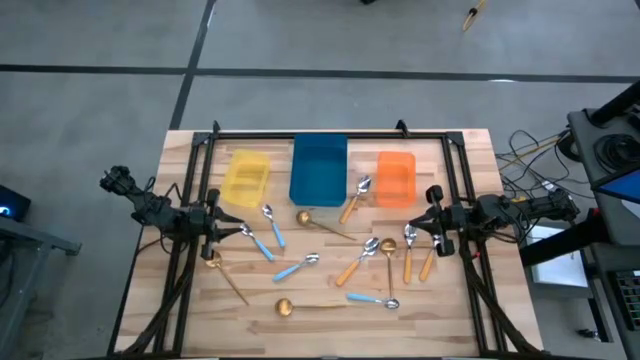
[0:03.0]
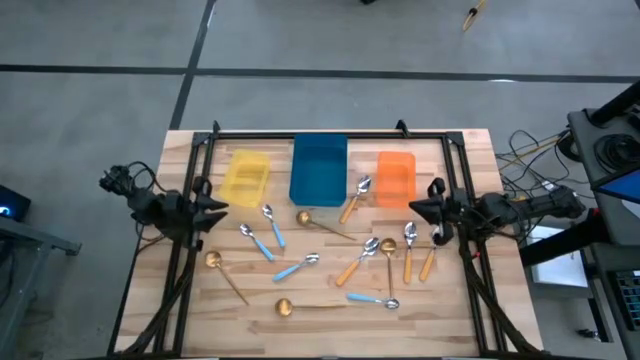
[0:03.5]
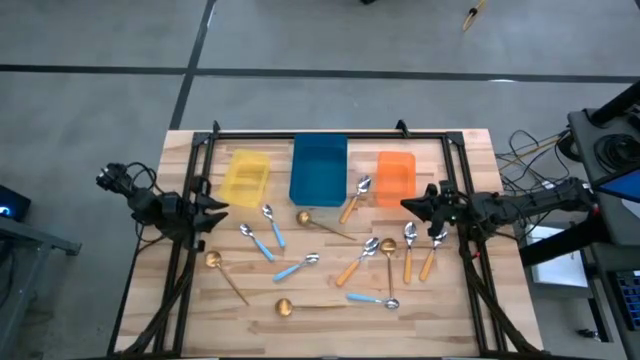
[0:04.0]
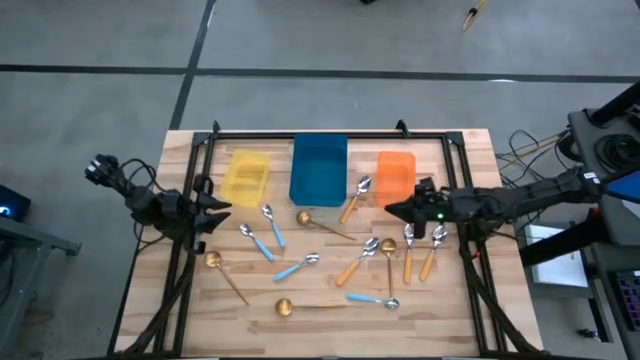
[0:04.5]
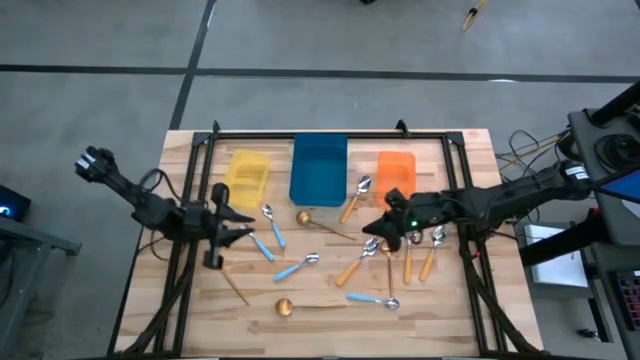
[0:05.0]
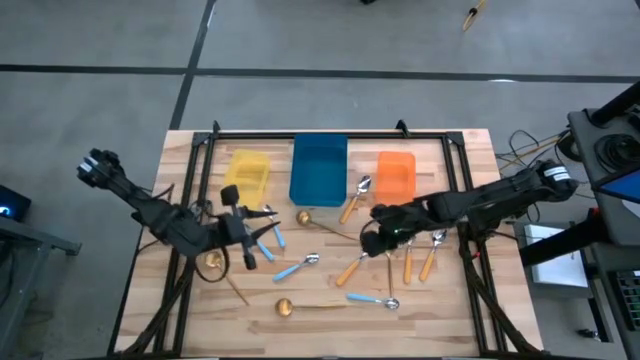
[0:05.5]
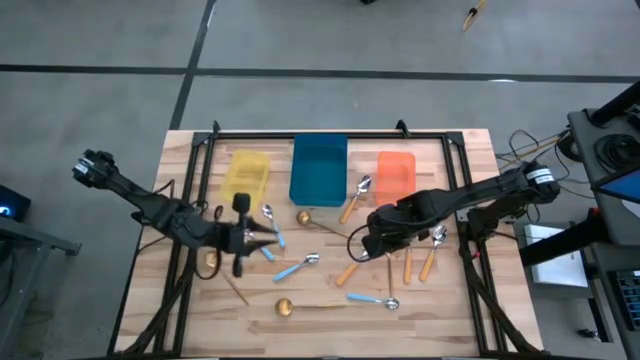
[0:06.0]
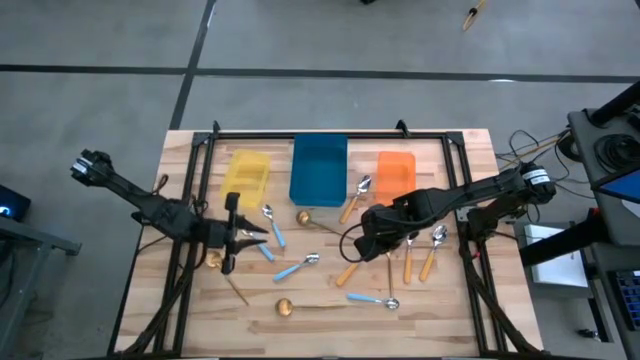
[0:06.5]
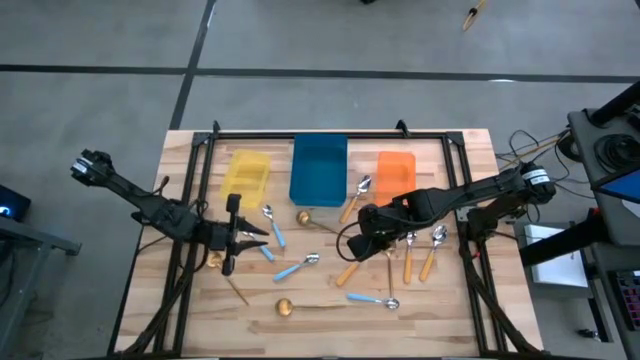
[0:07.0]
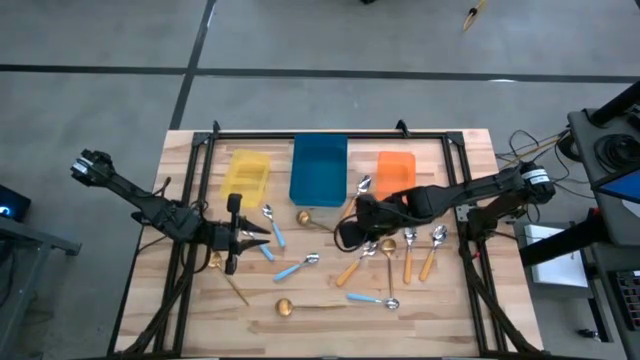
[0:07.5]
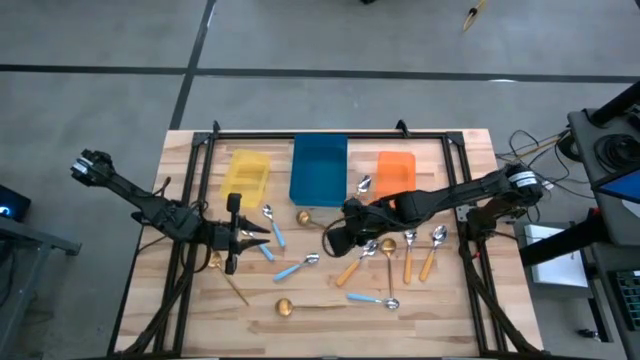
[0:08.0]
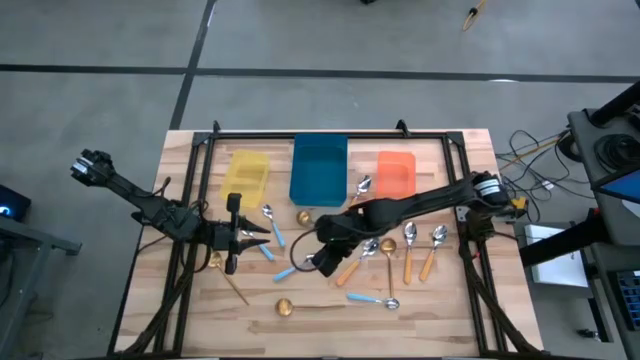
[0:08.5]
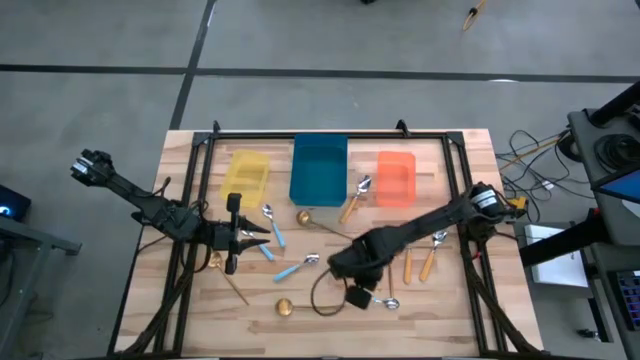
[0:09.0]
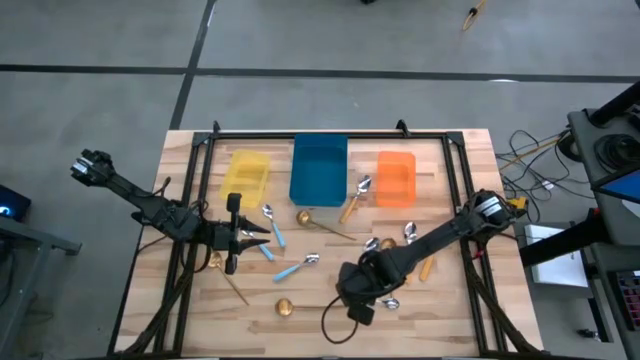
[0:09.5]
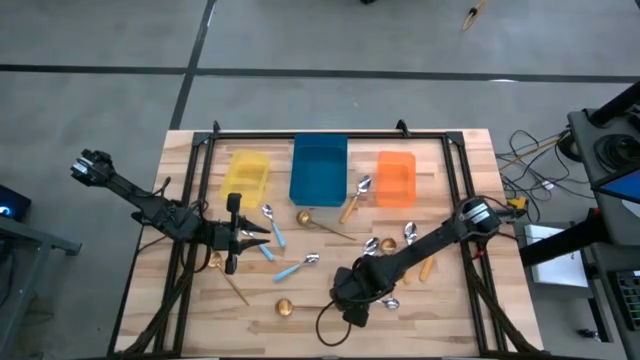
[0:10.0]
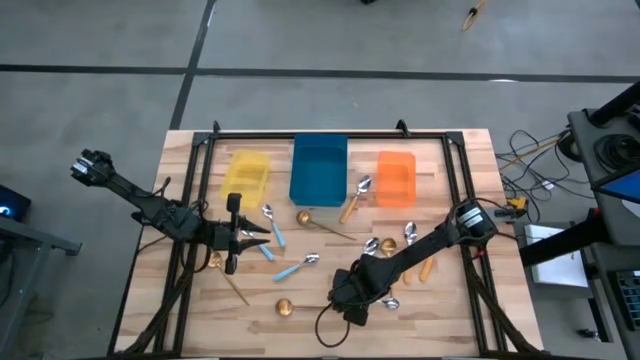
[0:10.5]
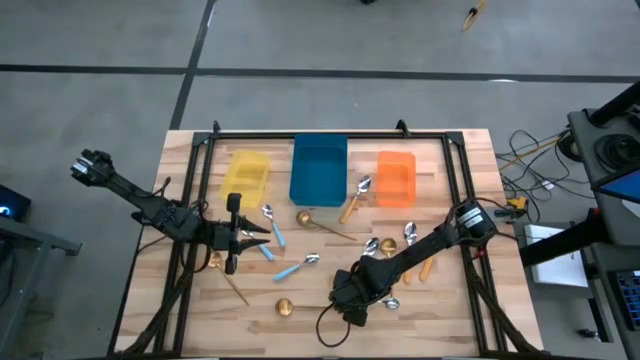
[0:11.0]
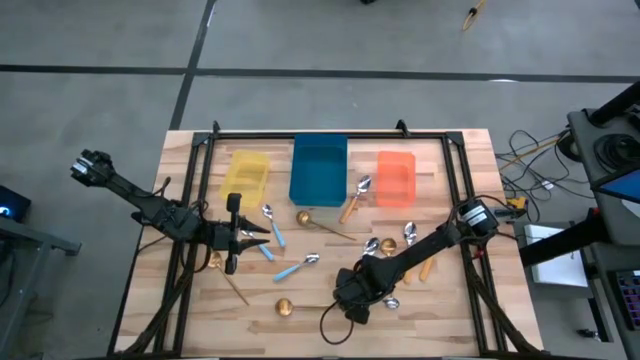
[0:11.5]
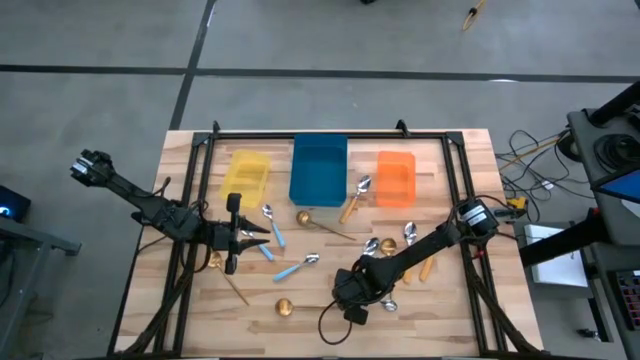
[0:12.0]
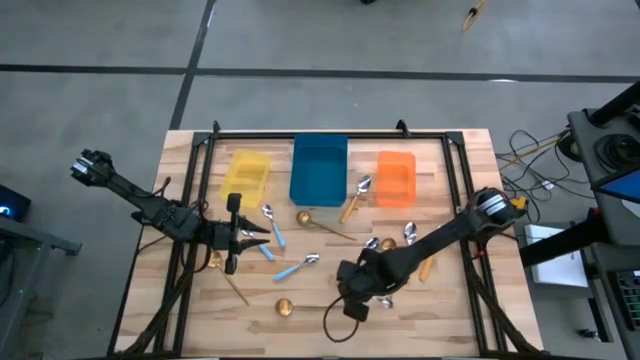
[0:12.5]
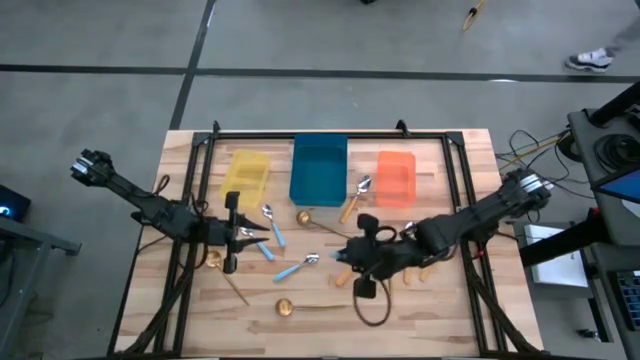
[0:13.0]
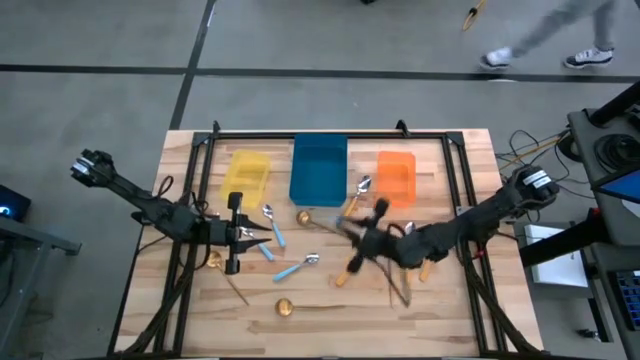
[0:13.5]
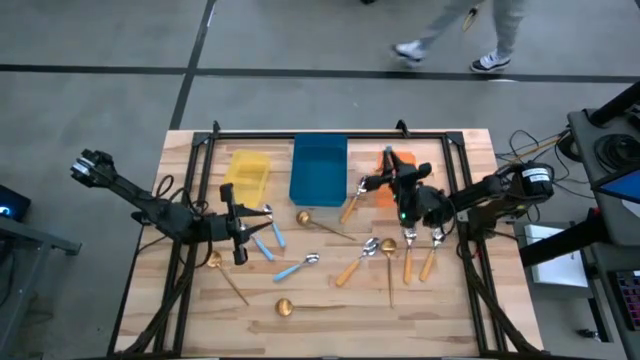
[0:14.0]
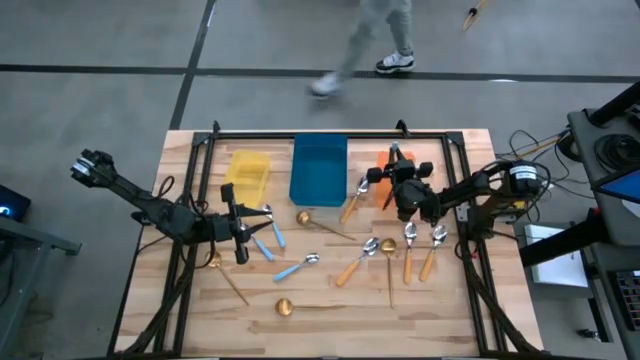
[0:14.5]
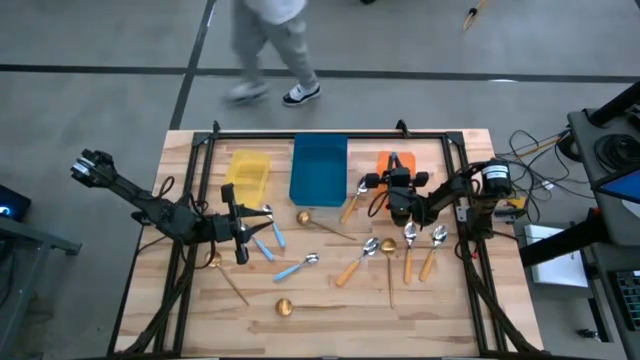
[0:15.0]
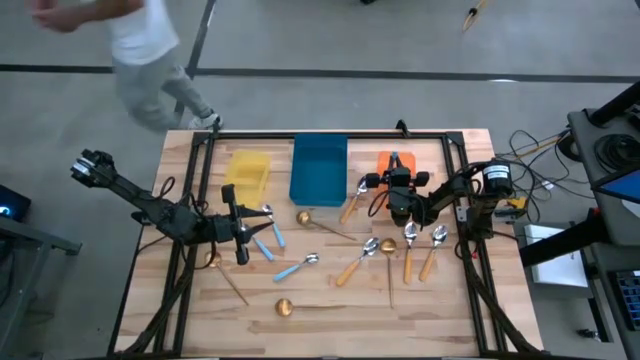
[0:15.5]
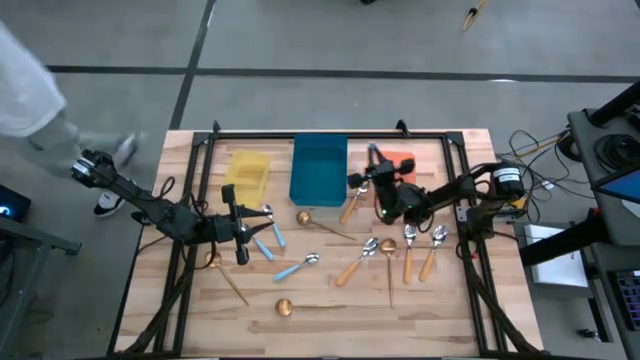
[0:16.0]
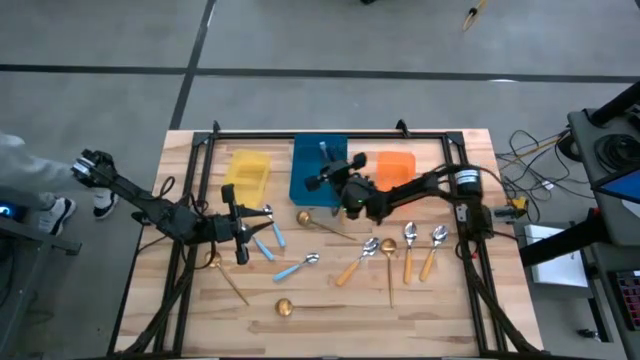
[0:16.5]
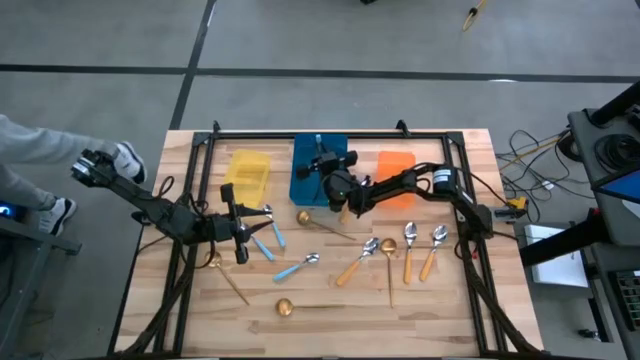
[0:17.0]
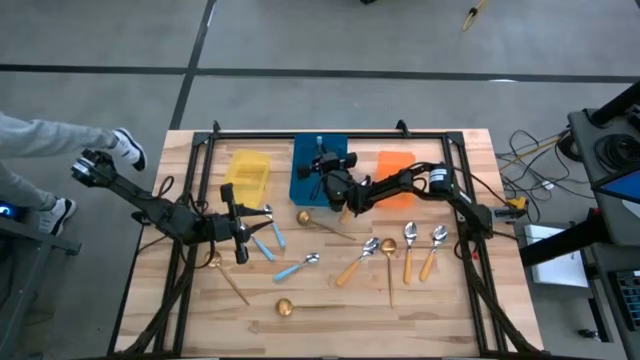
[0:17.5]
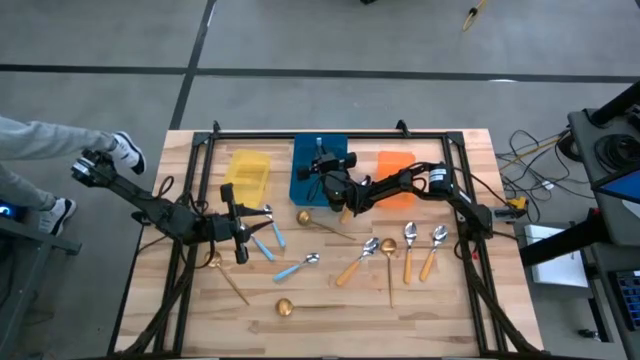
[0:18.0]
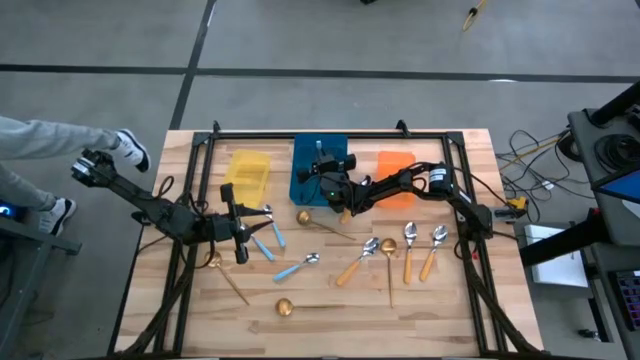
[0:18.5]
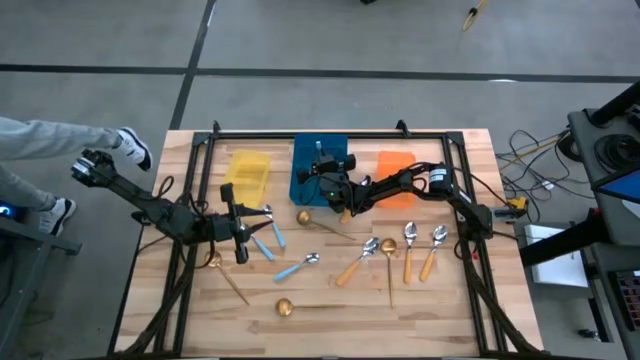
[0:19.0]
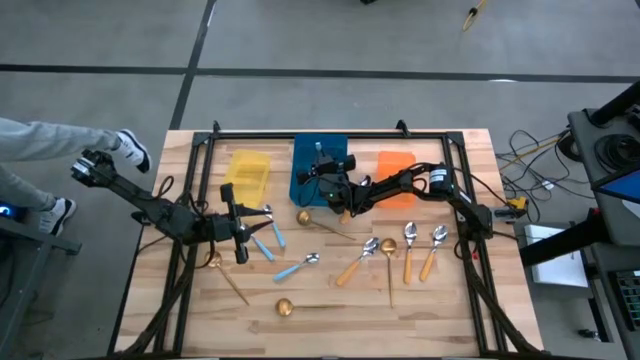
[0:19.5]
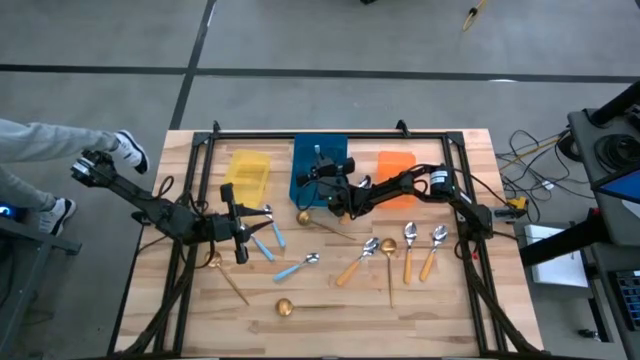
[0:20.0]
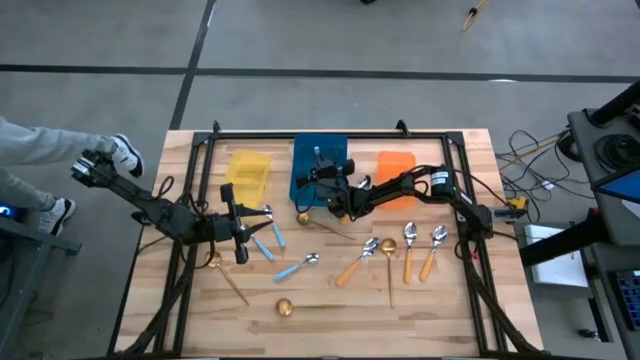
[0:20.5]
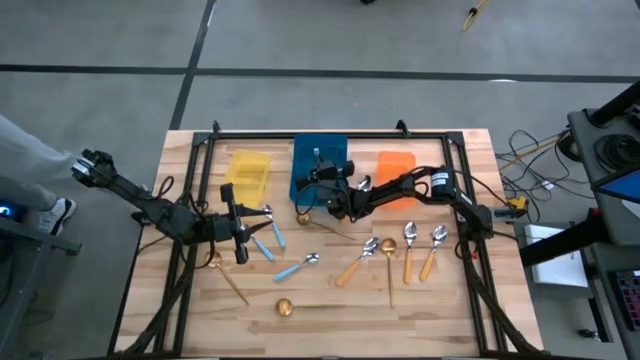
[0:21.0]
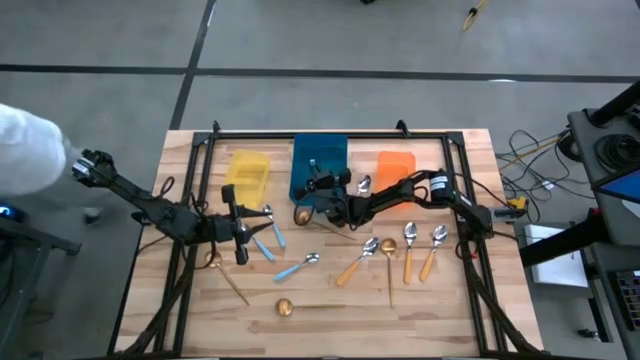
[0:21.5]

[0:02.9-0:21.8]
Task: Sort silverware by color (type)
Put the blue spoon into the blue bin
